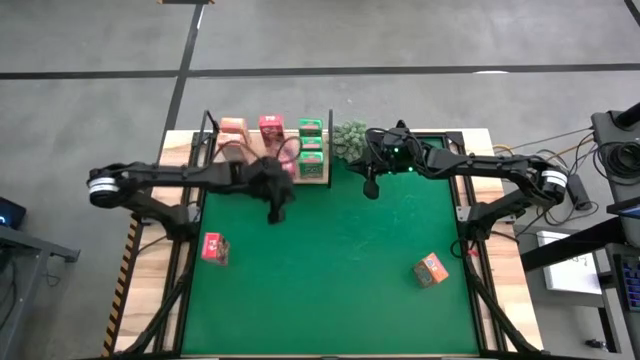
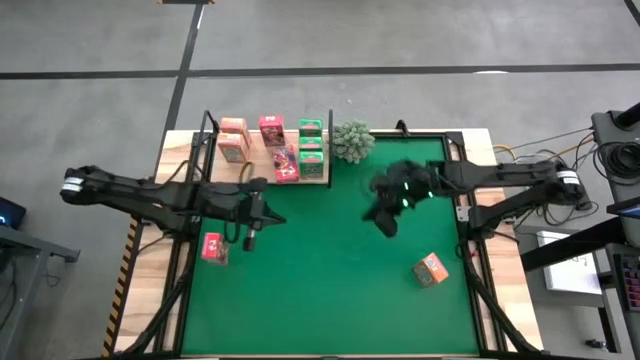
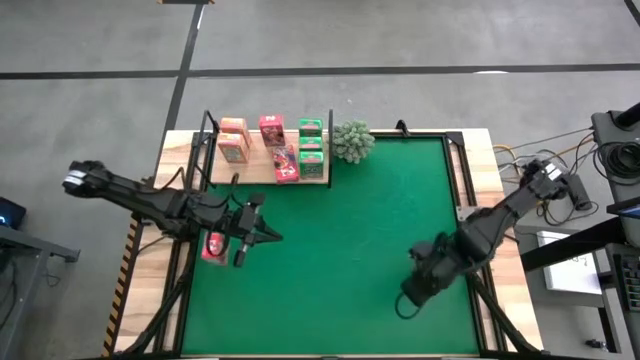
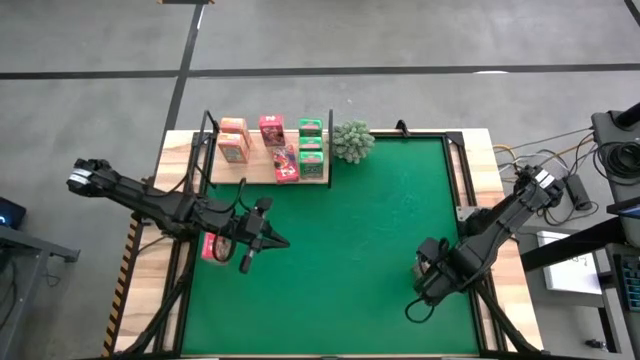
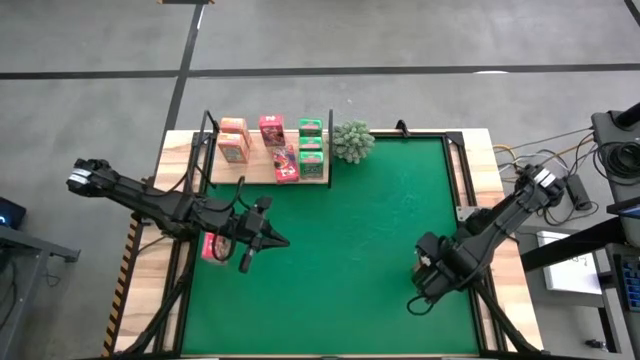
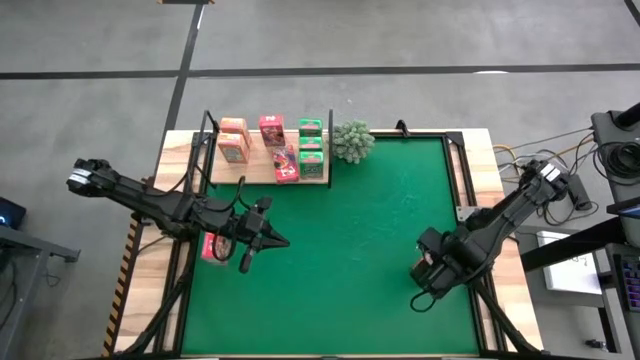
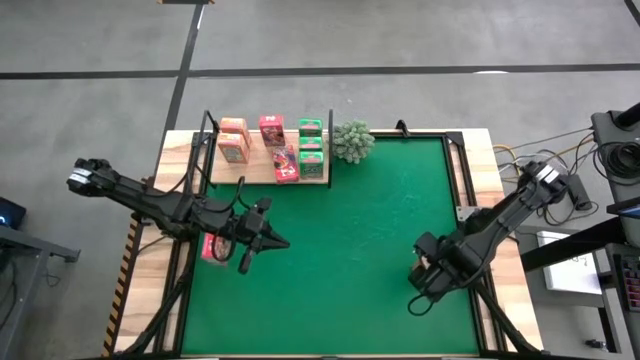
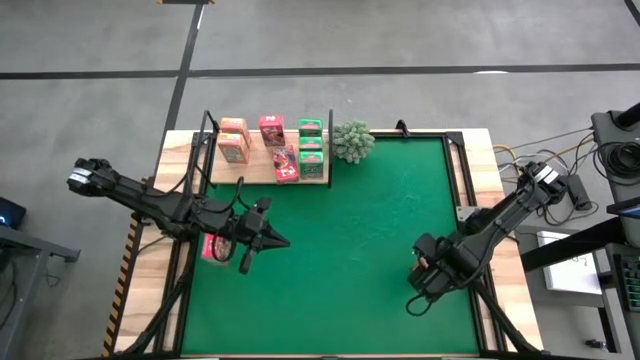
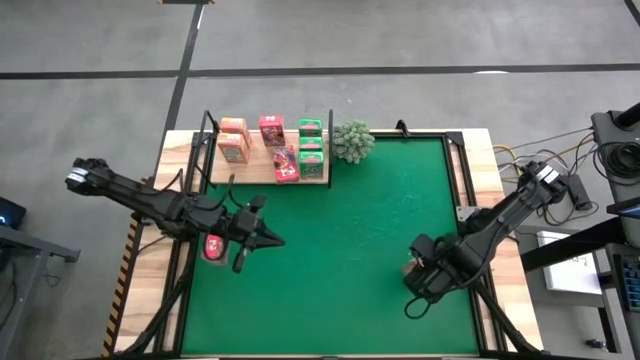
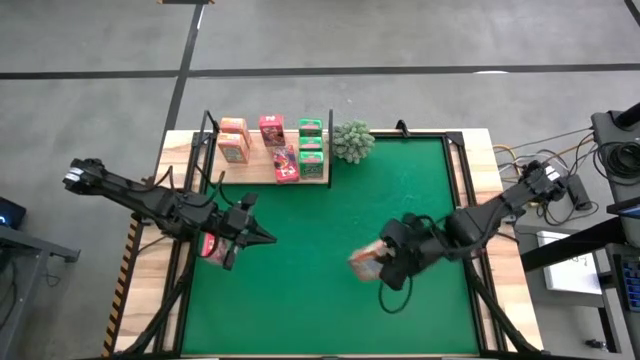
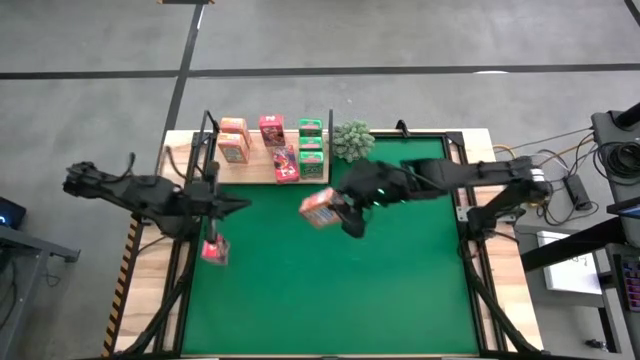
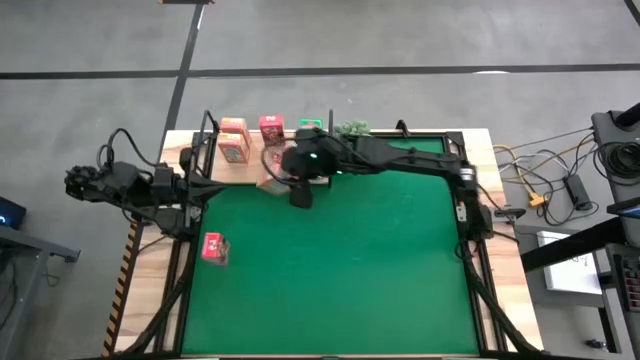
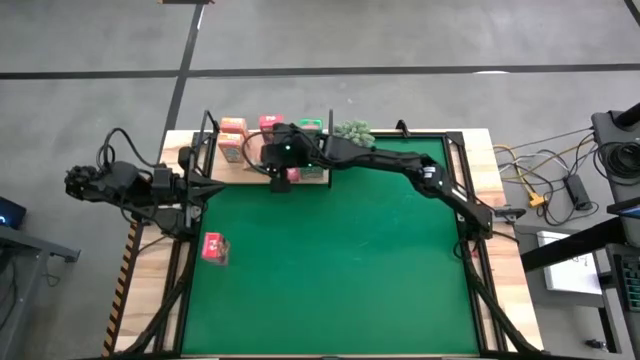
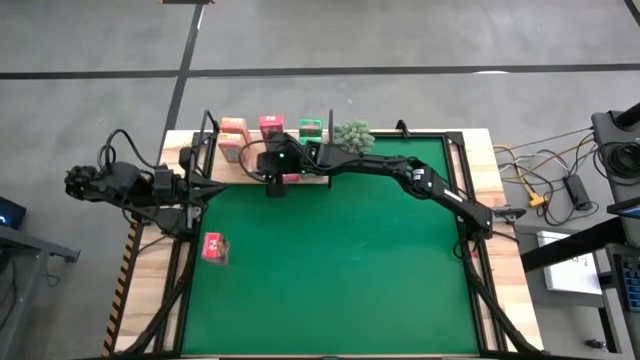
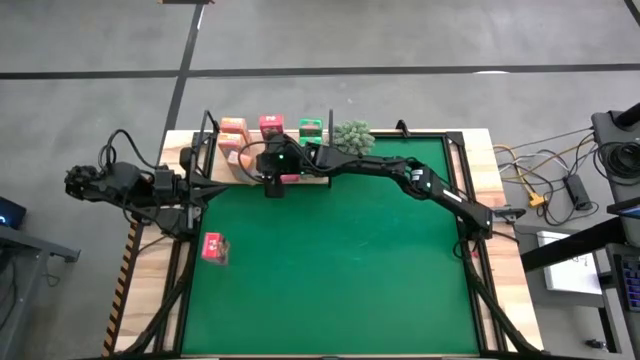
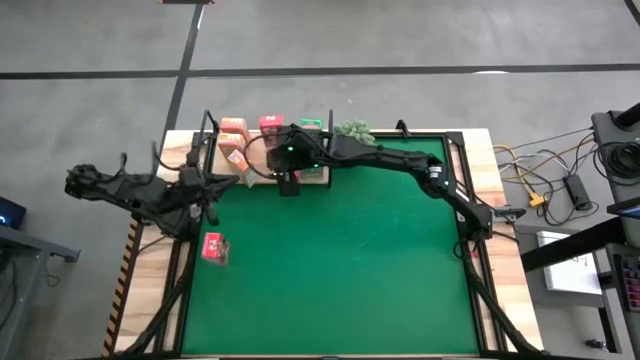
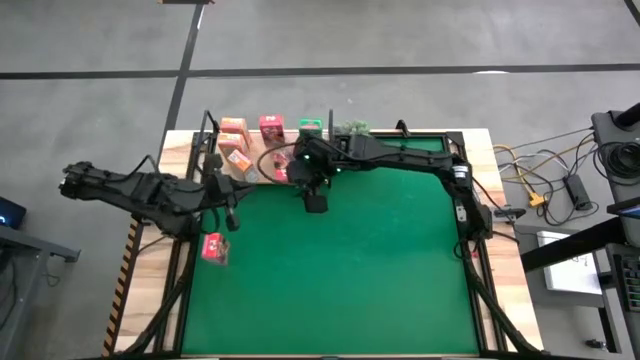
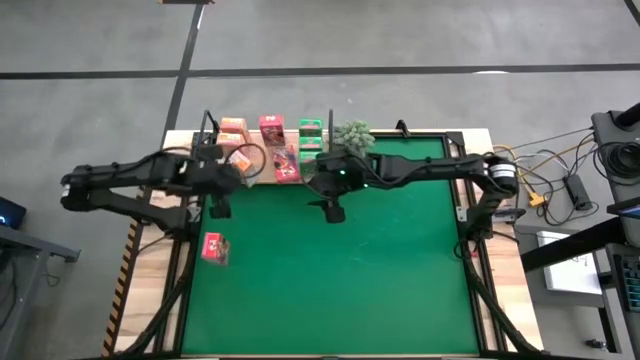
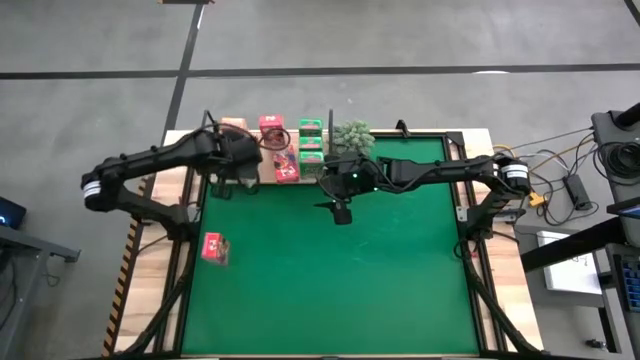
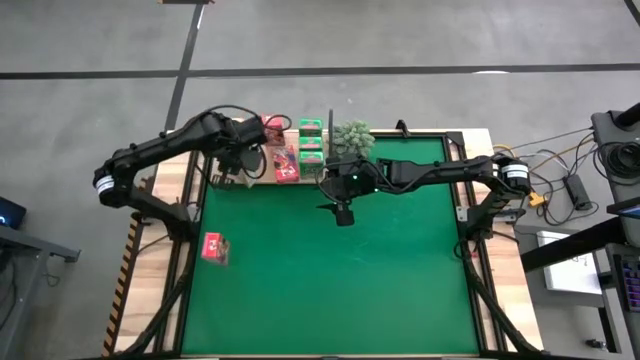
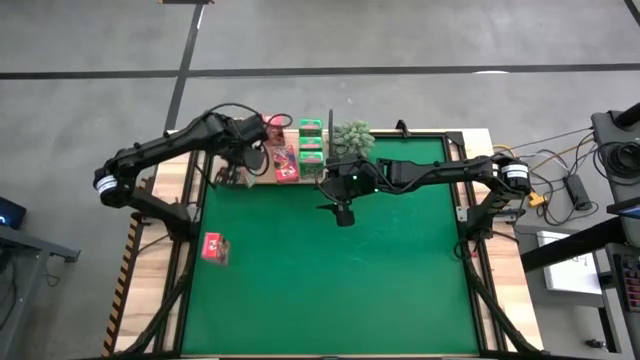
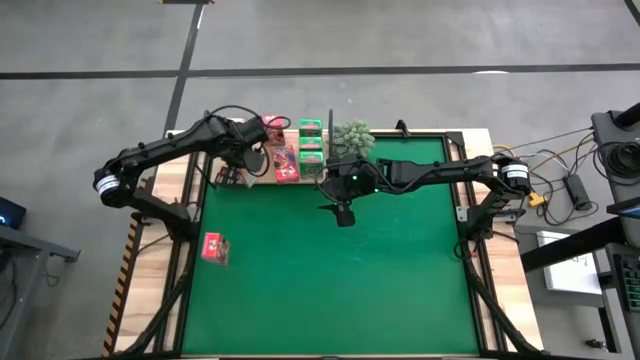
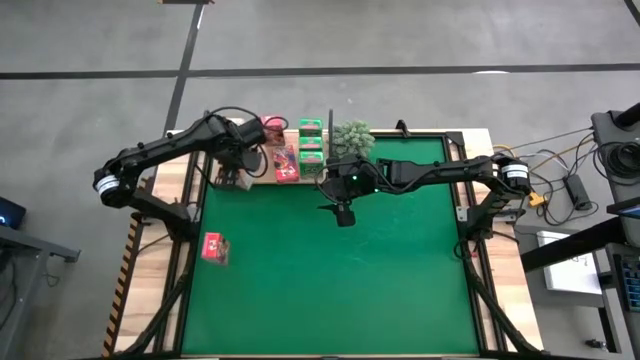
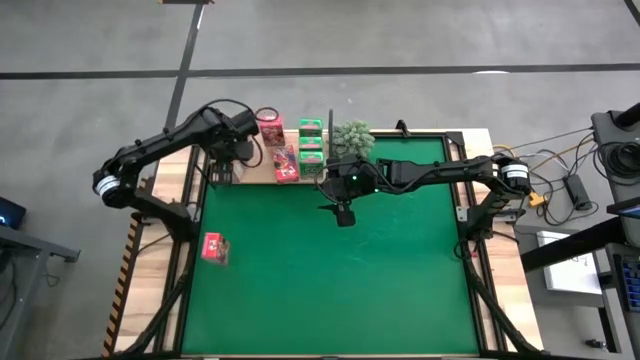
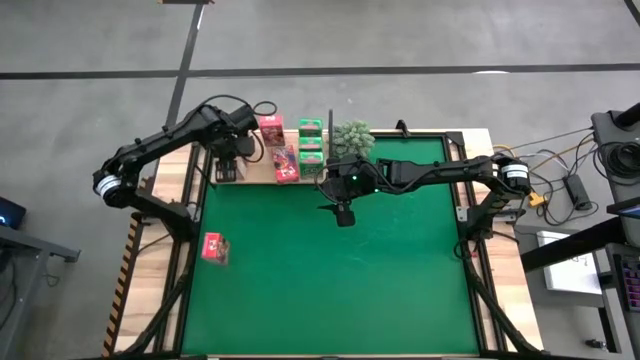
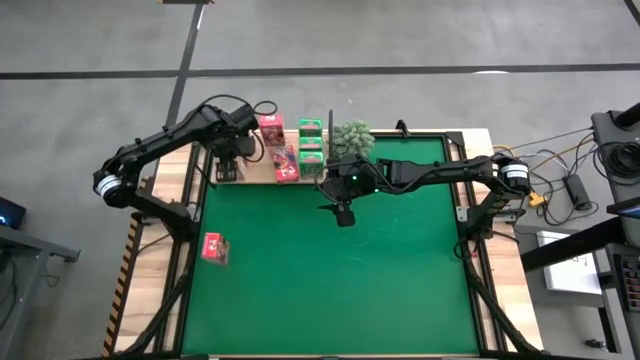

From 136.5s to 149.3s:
Task: Stack cereal on shelf
Put the orange cereal box on the shelf aligned with the other orange cereal box
